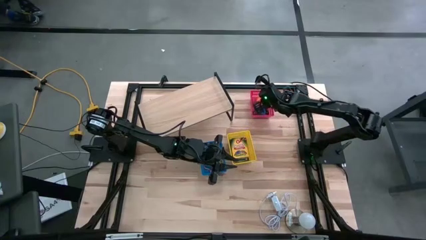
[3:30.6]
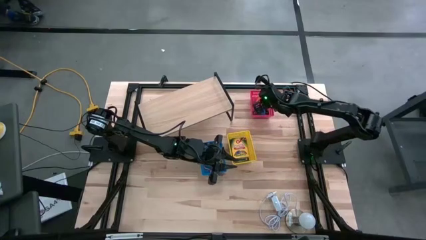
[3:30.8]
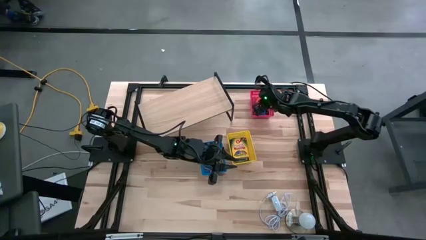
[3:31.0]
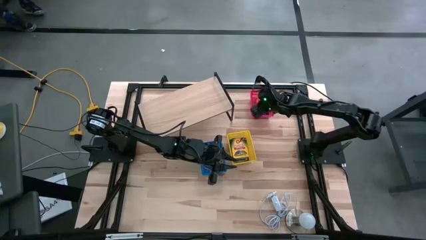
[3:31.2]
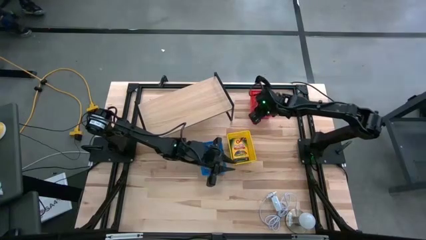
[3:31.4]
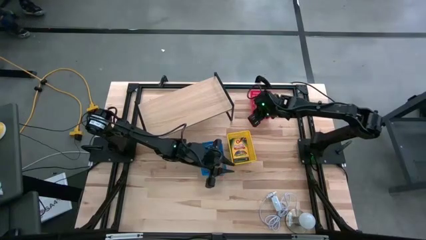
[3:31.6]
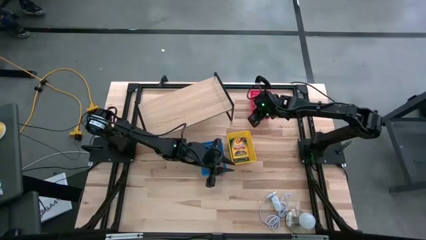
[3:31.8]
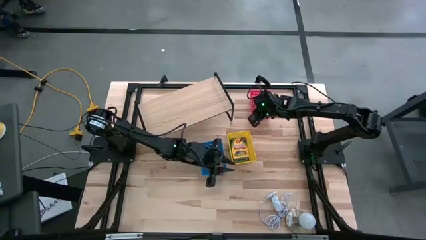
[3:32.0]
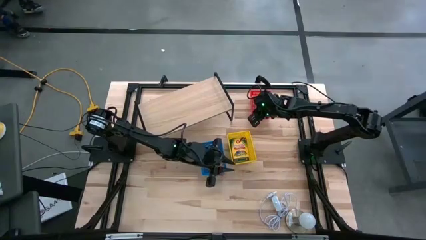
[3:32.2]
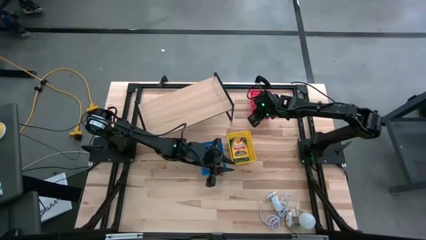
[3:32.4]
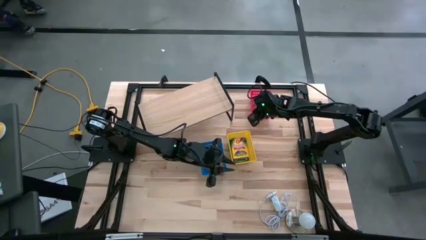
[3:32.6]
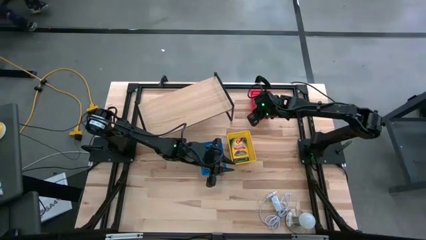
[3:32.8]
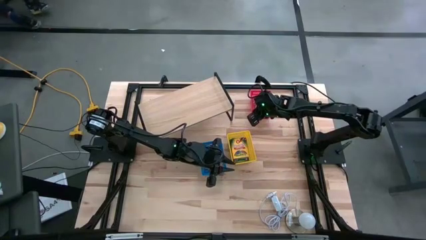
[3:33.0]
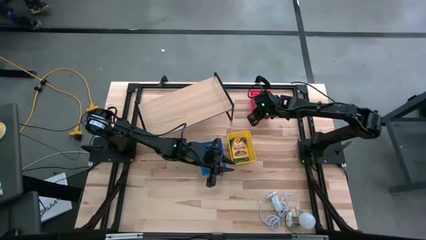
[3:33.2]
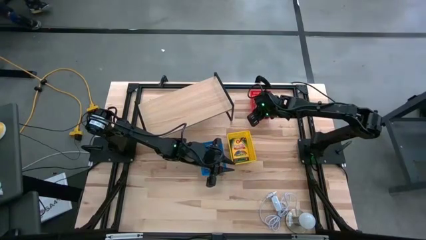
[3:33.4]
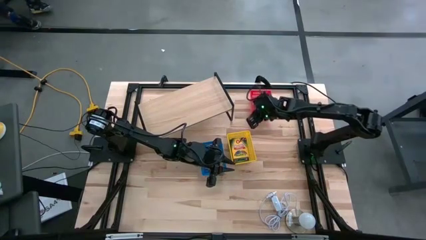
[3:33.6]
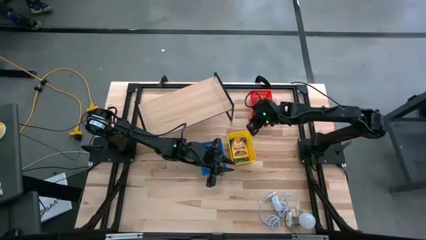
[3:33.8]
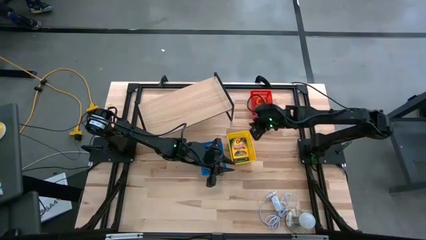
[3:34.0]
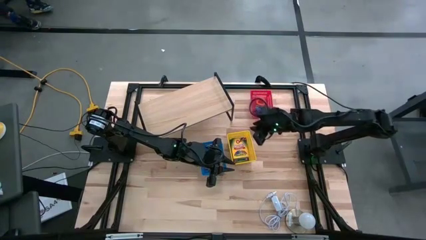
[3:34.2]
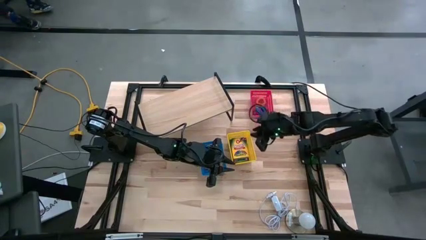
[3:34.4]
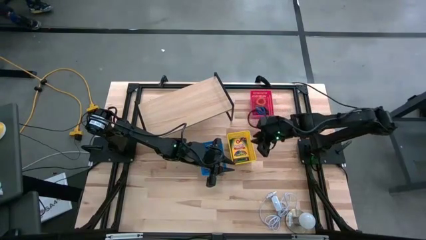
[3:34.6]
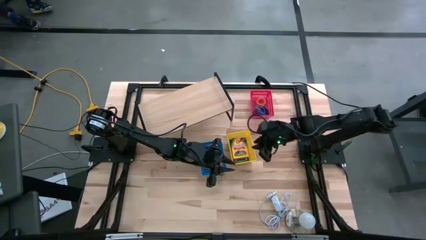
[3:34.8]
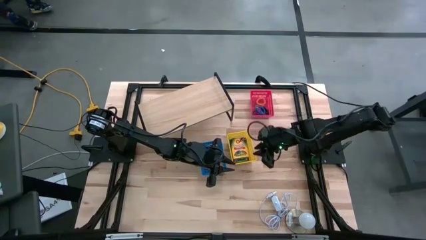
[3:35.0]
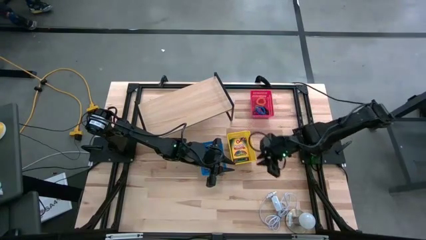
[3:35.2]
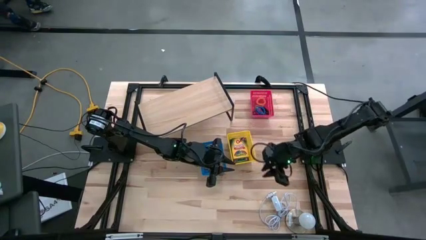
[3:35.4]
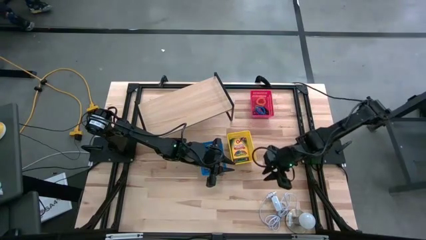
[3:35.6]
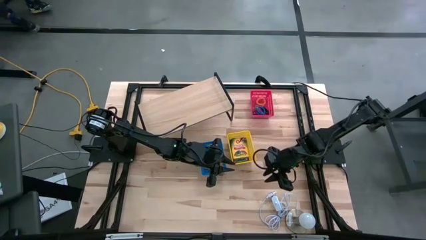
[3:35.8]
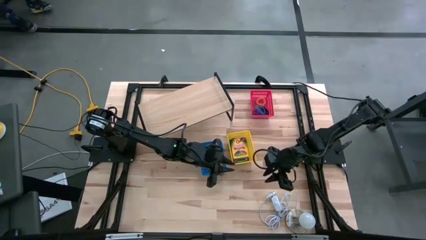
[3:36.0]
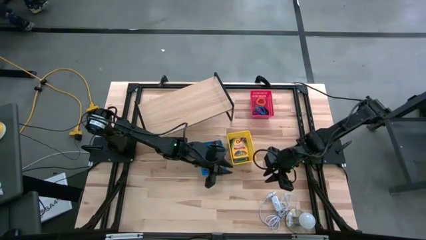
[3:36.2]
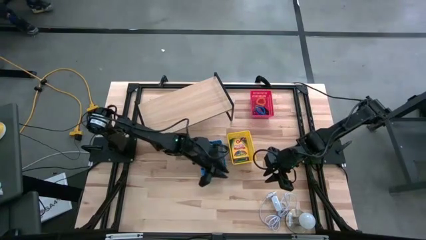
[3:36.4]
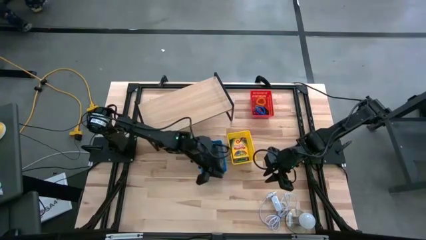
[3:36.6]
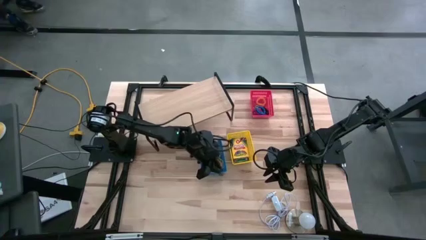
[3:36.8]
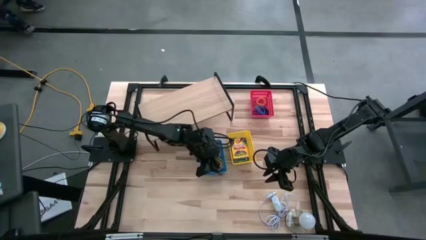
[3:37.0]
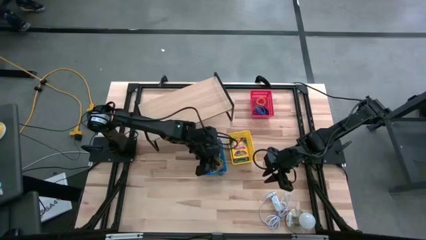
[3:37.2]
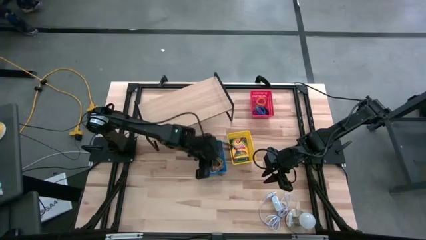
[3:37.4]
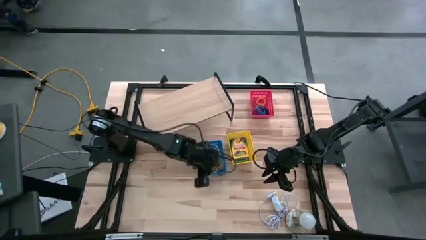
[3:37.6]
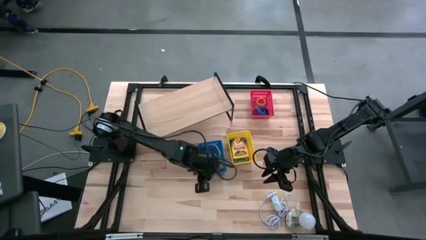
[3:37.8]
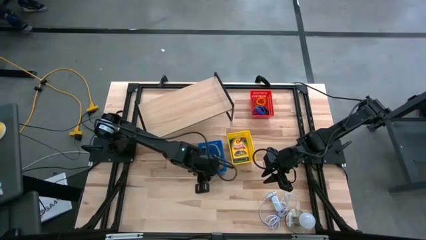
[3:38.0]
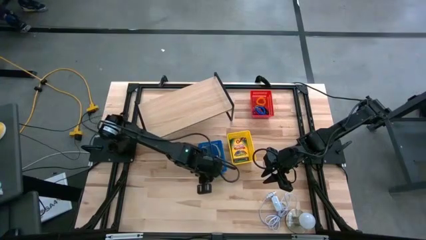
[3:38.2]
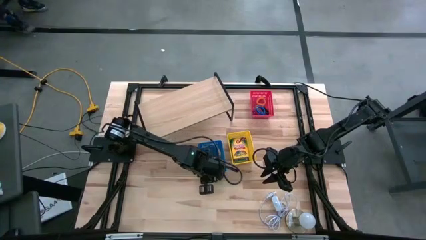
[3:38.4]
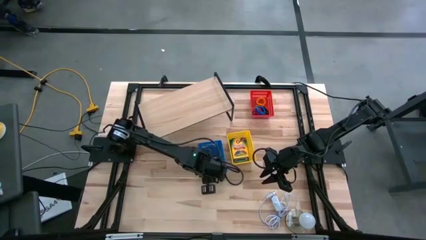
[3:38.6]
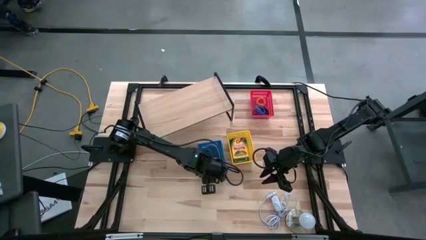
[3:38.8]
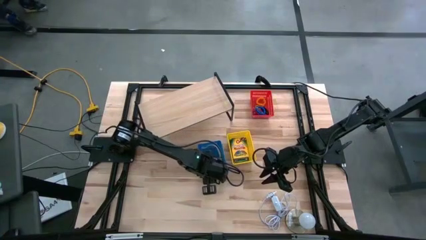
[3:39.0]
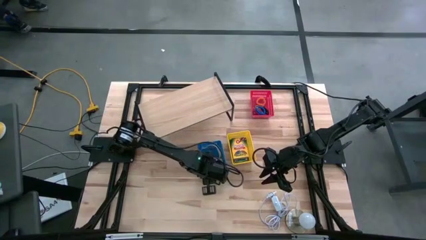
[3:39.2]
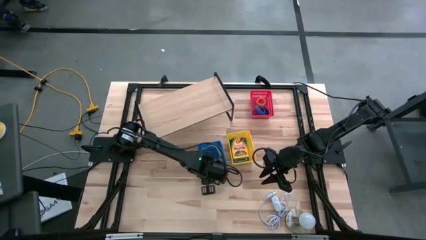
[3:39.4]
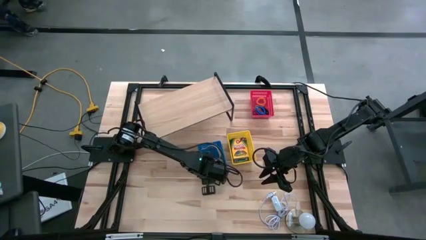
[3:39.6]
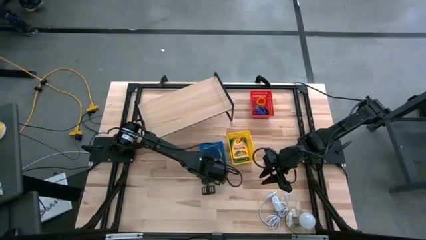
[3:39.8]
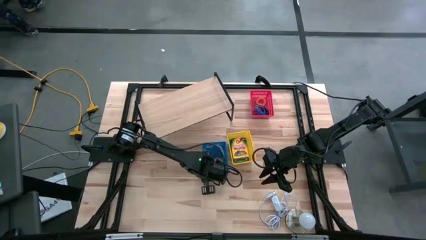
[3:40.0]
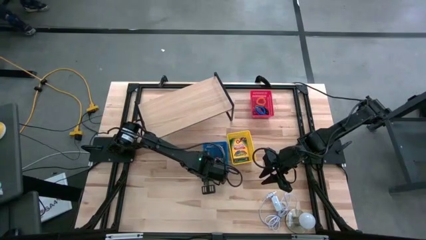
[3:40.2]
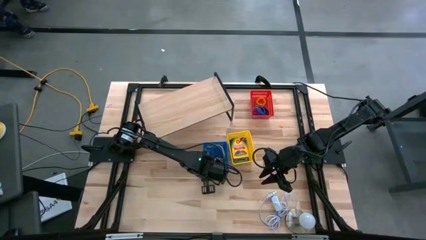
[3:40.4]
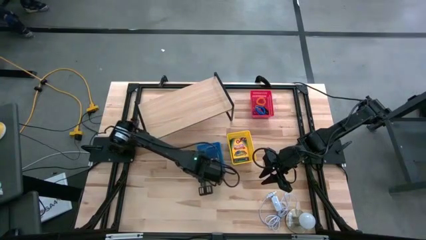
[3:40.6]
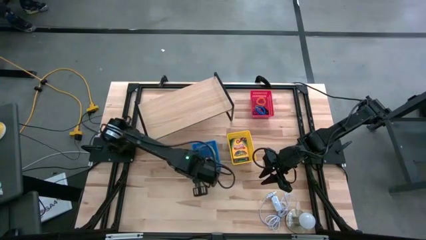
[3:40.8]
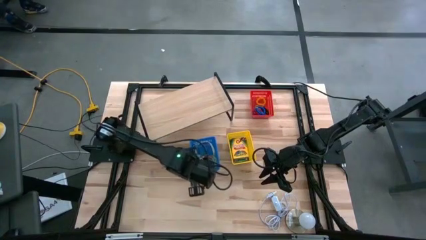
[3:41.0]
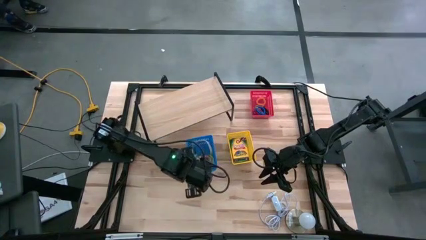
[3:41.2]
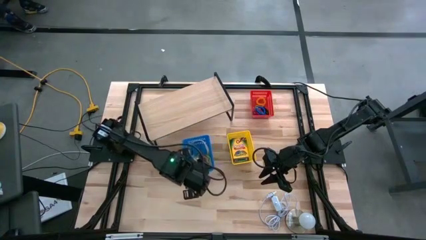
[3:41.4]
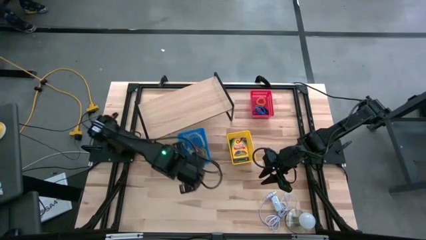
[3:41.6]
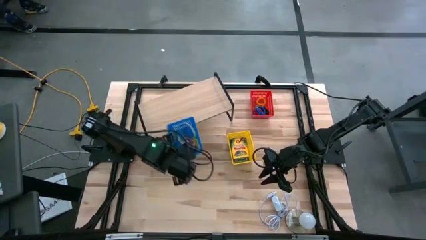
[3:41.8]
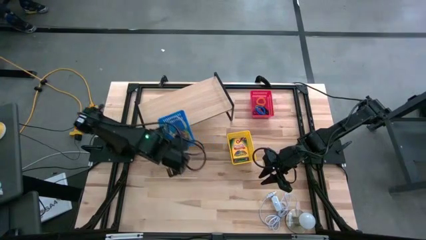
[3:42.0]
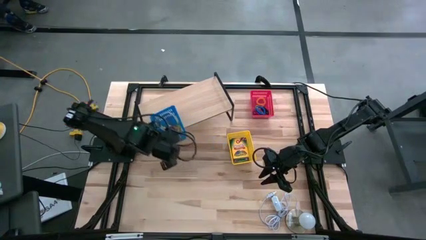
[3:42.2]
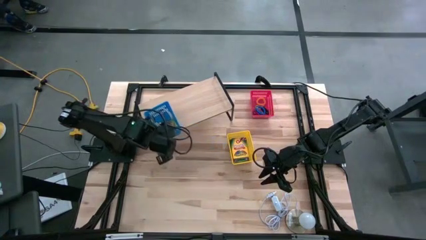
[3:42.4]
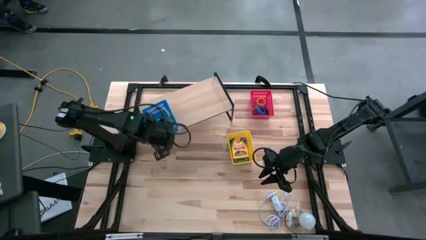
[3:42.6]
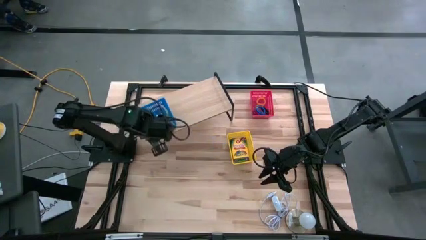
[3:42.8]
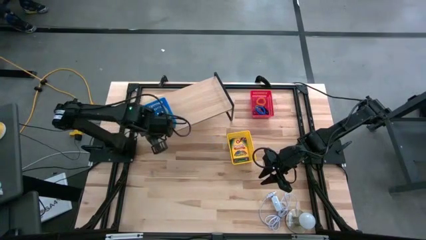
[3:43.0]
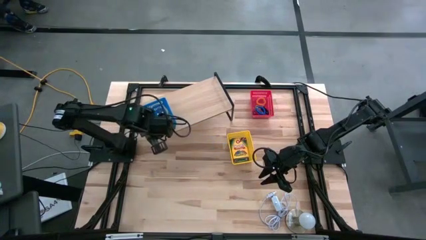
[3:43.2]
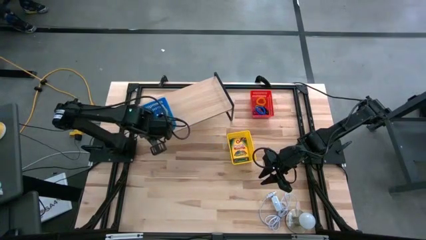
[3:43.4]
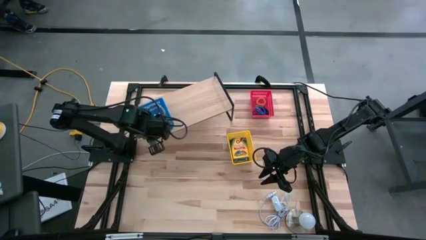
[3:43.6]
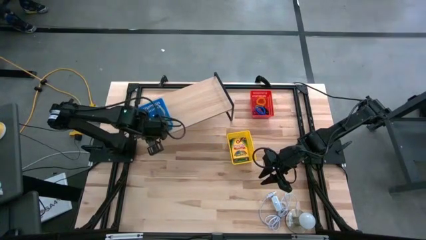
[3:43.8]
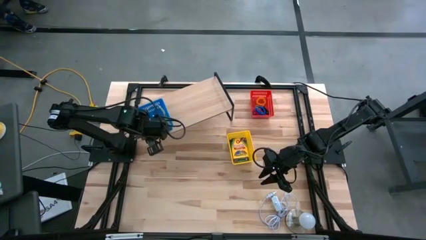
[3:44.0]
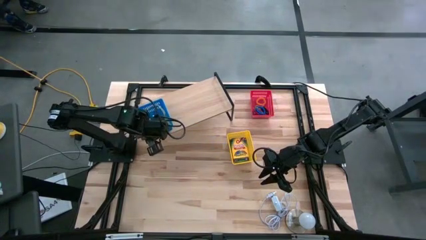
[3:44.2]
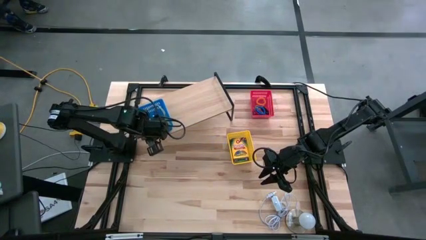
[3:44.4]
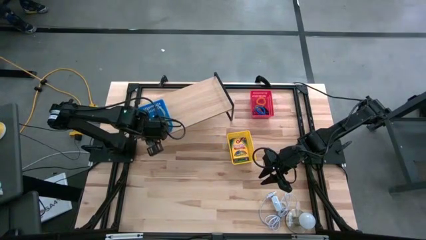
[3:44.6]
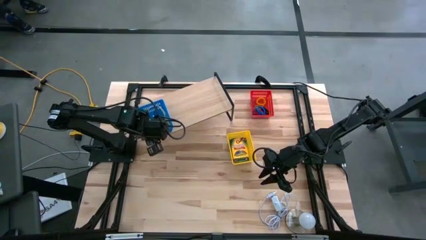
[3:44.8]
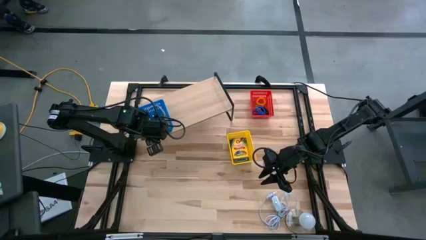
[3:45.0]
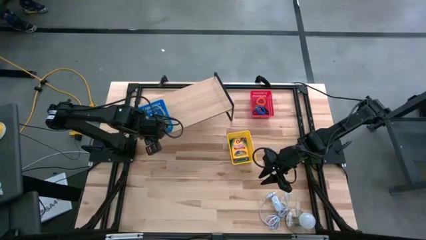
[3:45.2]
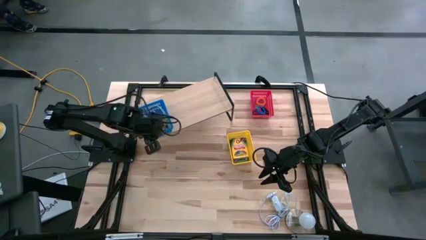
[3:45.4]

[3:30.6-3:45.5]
Task: Pick & Place Office Desk Supplies
Put the blue bin with rubber bands on the shelf
